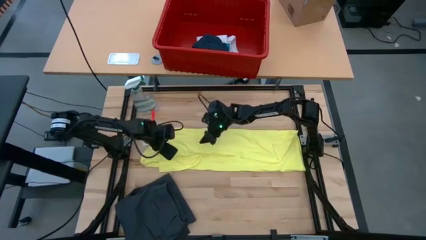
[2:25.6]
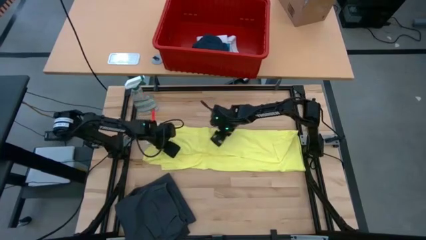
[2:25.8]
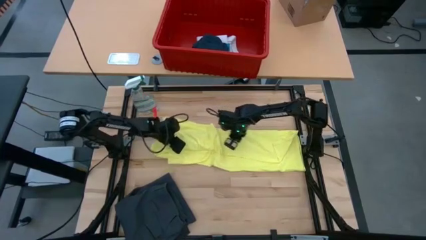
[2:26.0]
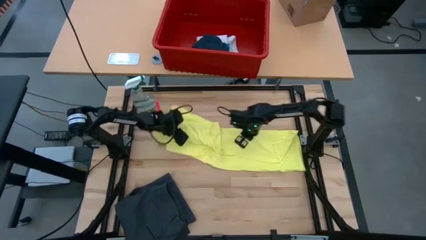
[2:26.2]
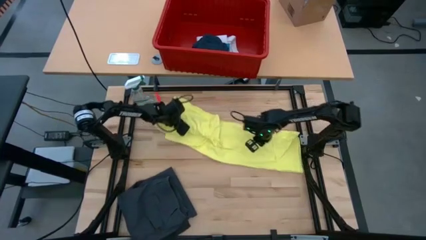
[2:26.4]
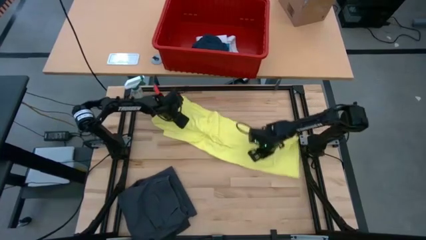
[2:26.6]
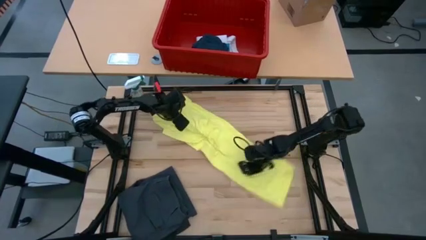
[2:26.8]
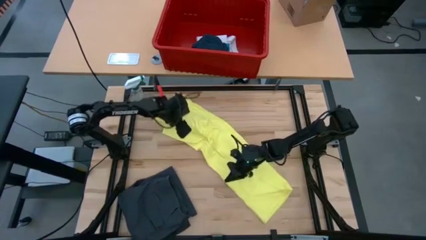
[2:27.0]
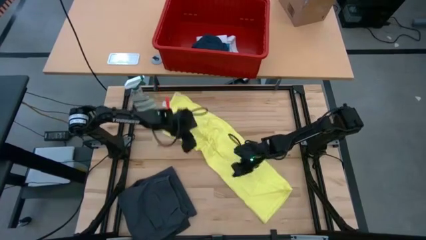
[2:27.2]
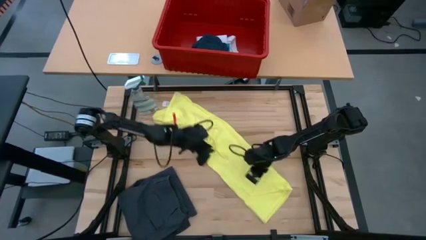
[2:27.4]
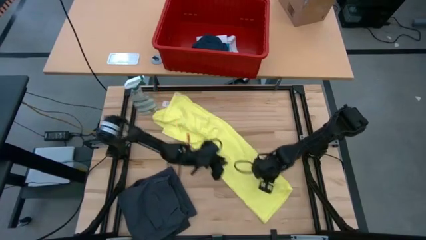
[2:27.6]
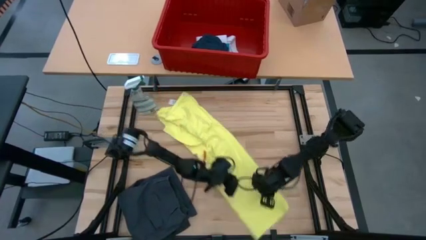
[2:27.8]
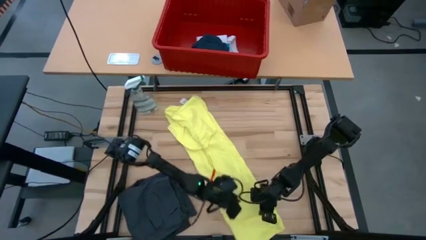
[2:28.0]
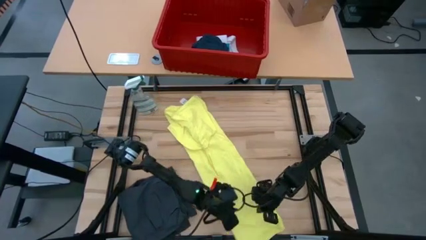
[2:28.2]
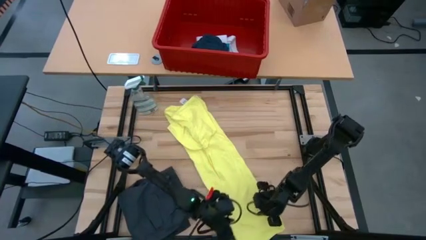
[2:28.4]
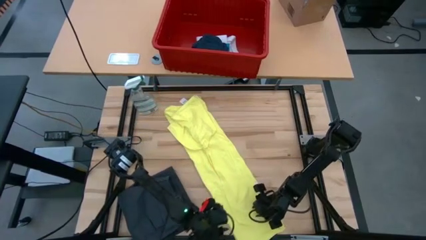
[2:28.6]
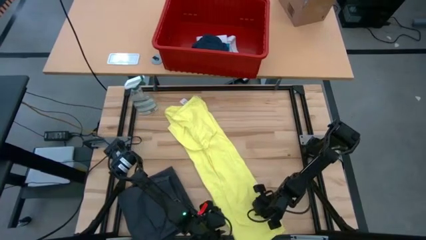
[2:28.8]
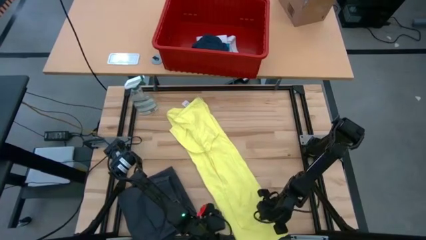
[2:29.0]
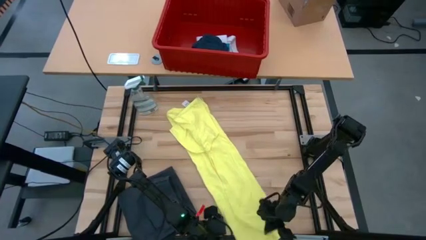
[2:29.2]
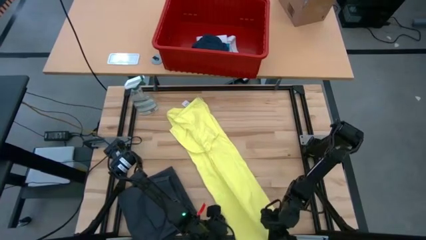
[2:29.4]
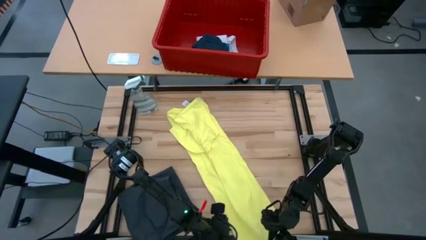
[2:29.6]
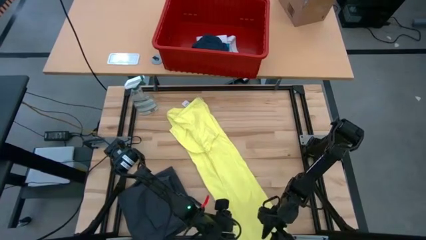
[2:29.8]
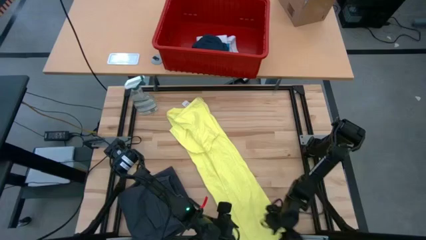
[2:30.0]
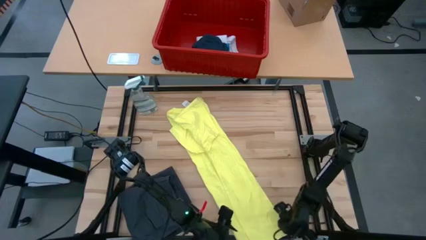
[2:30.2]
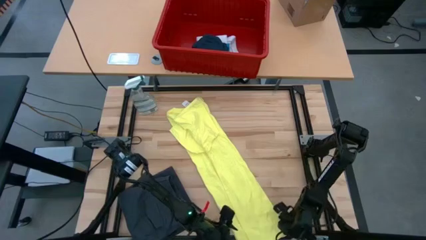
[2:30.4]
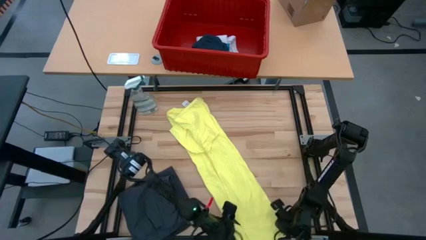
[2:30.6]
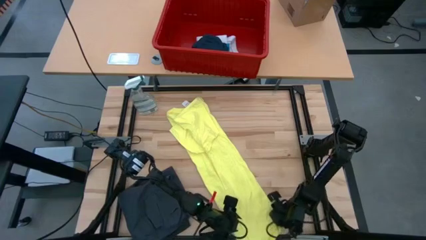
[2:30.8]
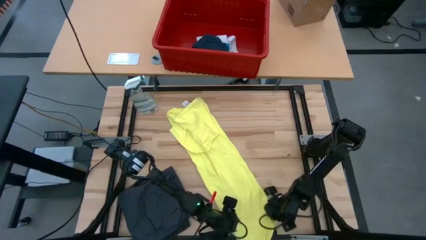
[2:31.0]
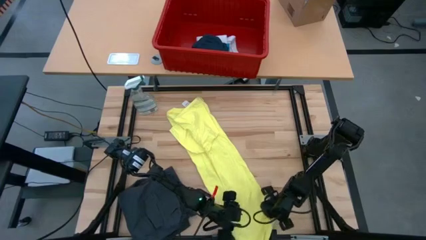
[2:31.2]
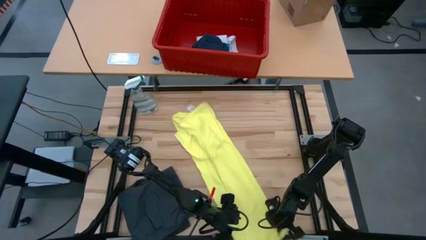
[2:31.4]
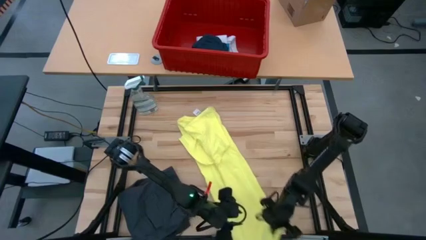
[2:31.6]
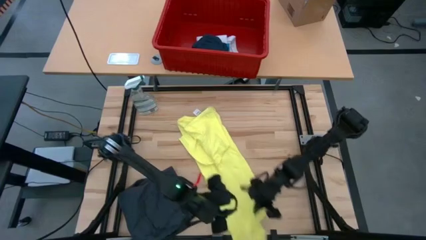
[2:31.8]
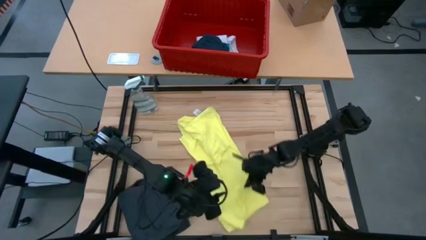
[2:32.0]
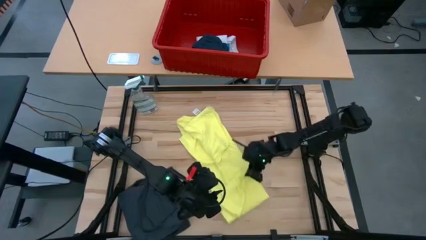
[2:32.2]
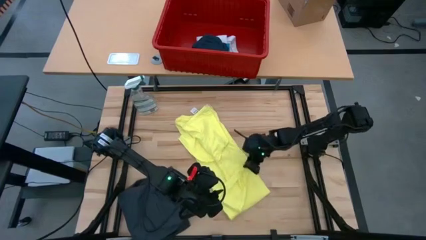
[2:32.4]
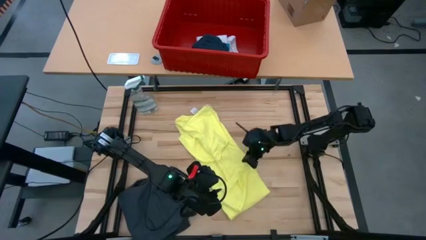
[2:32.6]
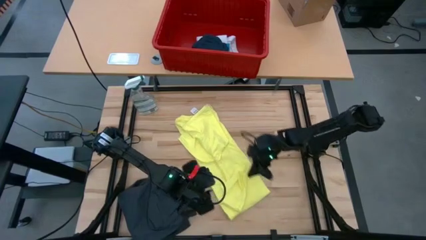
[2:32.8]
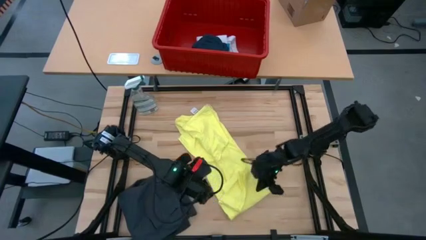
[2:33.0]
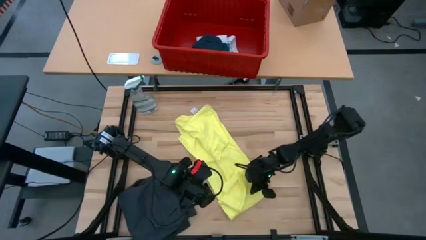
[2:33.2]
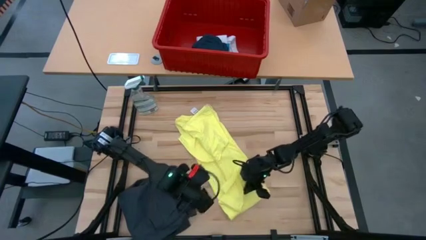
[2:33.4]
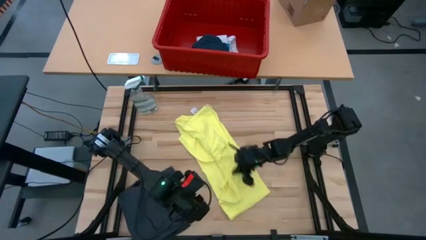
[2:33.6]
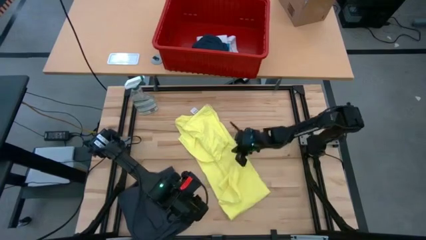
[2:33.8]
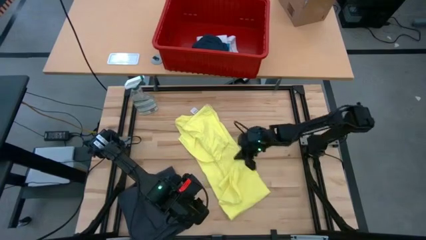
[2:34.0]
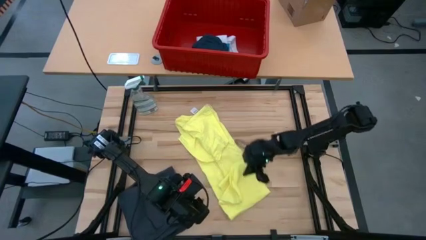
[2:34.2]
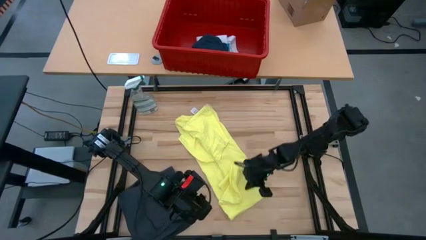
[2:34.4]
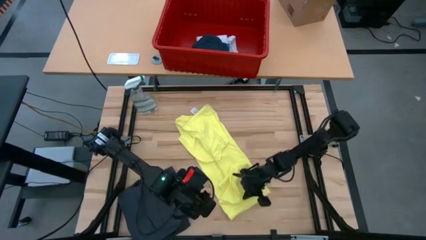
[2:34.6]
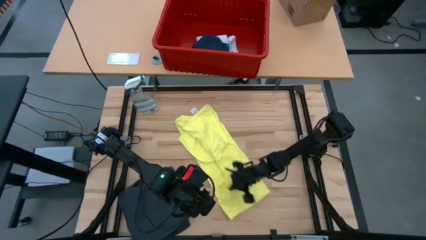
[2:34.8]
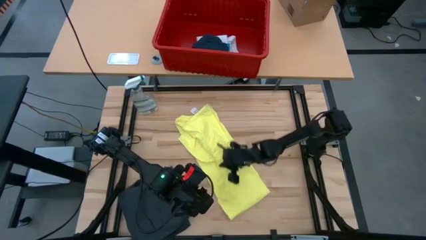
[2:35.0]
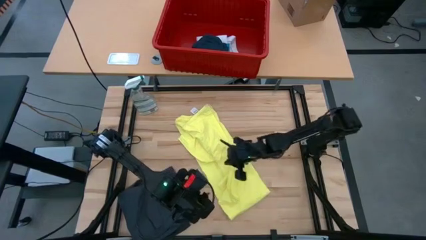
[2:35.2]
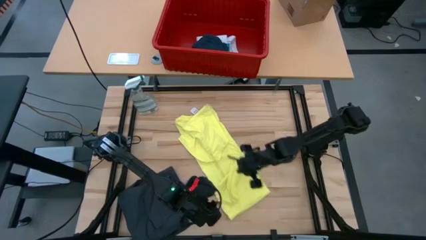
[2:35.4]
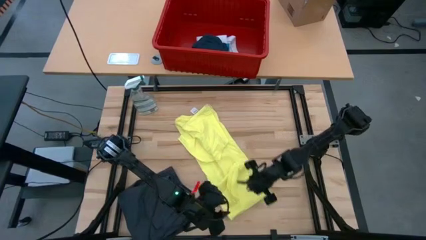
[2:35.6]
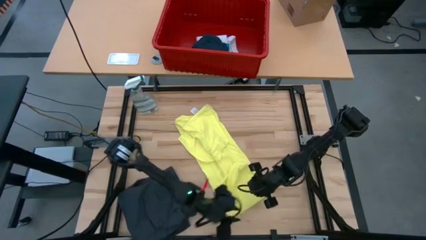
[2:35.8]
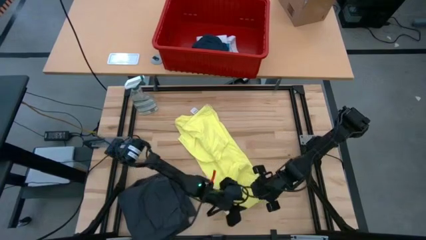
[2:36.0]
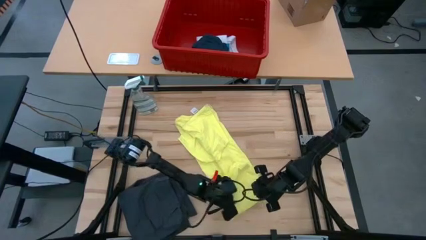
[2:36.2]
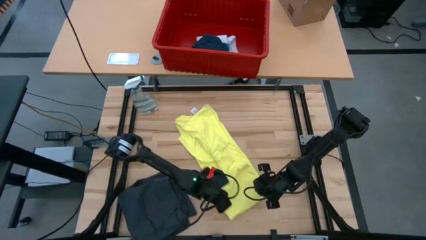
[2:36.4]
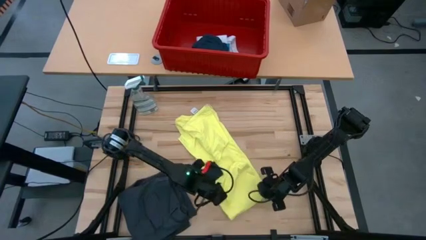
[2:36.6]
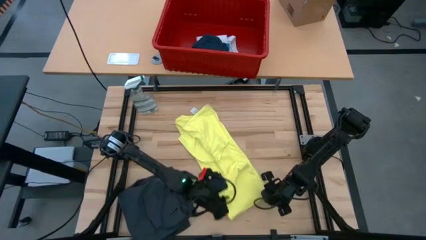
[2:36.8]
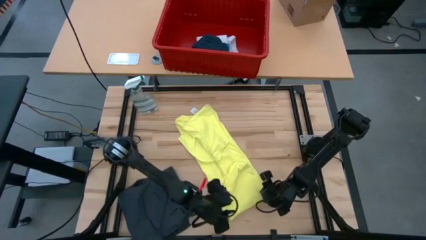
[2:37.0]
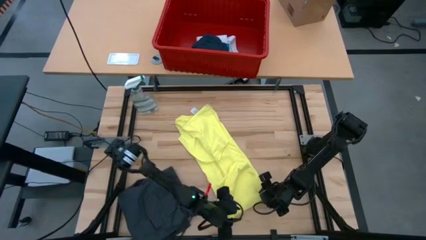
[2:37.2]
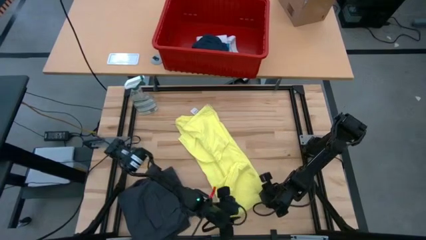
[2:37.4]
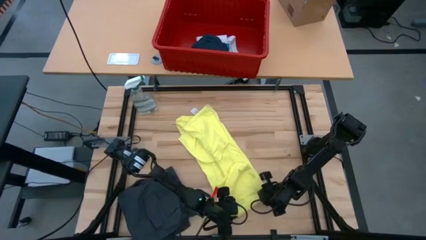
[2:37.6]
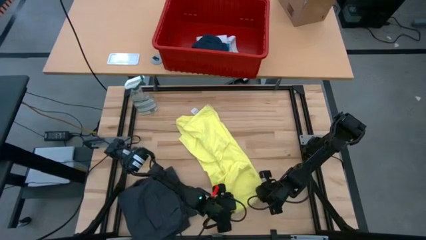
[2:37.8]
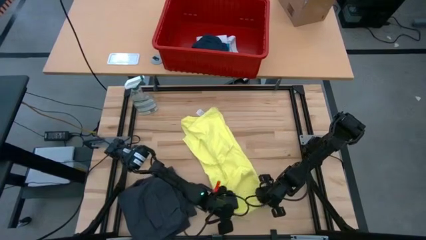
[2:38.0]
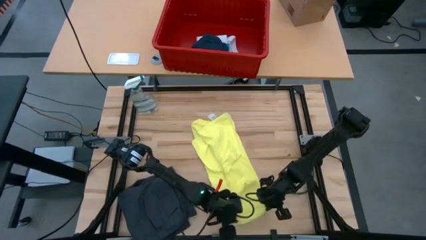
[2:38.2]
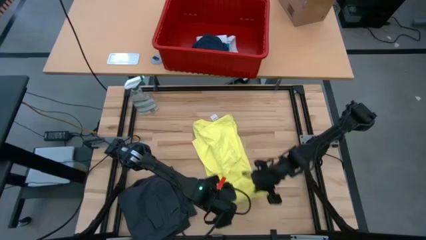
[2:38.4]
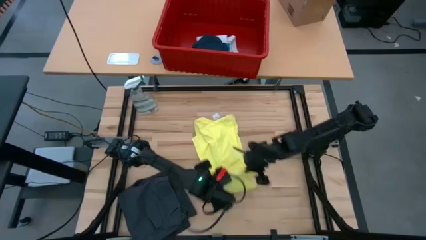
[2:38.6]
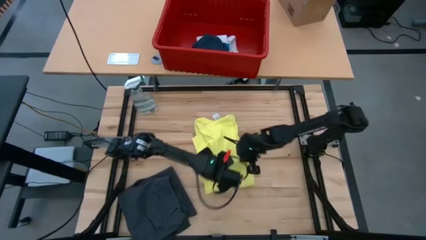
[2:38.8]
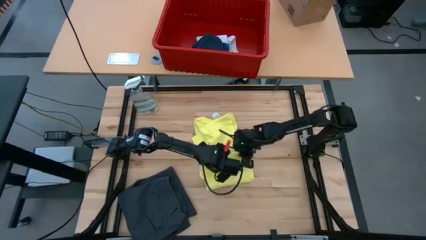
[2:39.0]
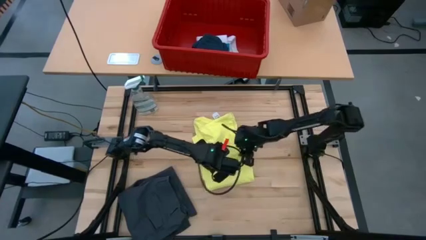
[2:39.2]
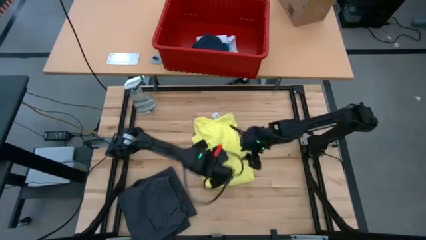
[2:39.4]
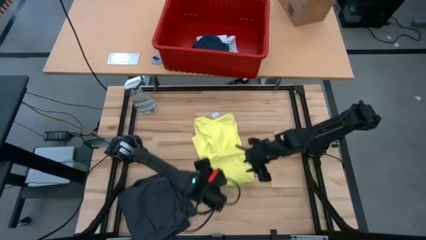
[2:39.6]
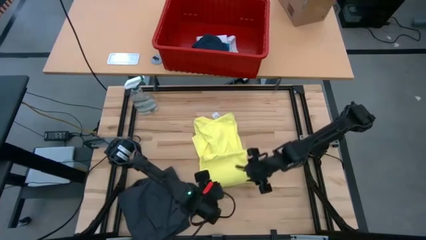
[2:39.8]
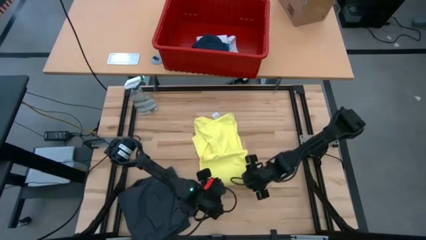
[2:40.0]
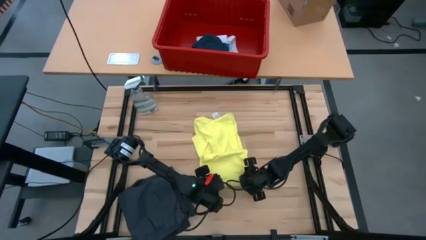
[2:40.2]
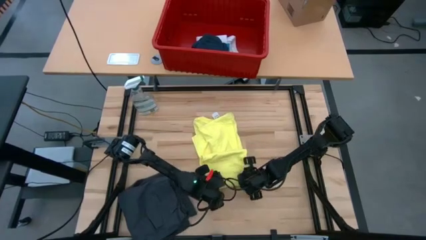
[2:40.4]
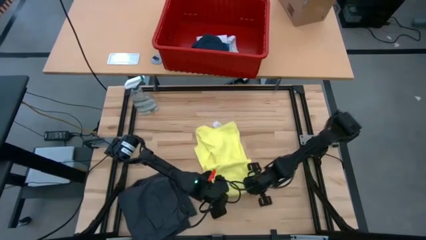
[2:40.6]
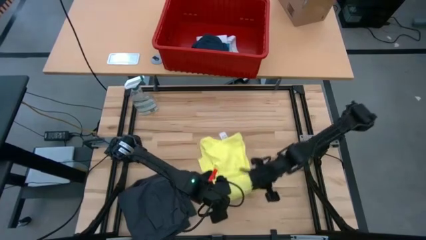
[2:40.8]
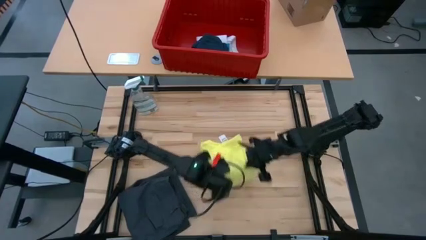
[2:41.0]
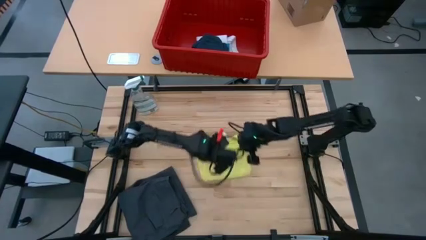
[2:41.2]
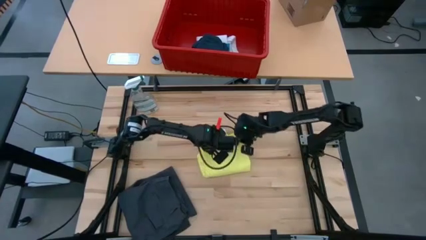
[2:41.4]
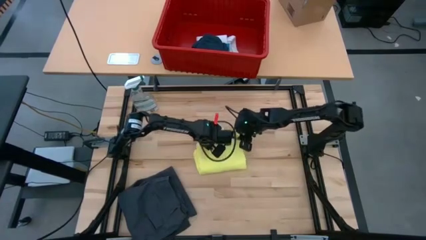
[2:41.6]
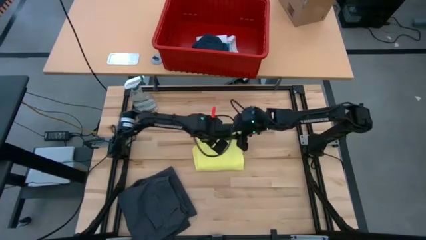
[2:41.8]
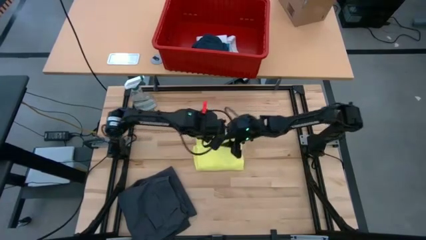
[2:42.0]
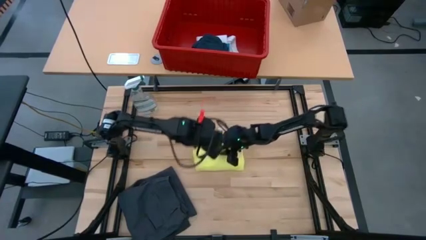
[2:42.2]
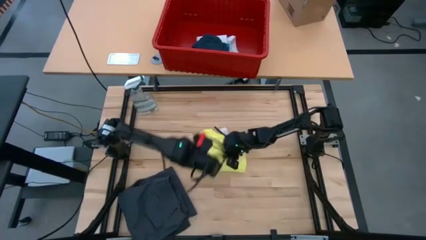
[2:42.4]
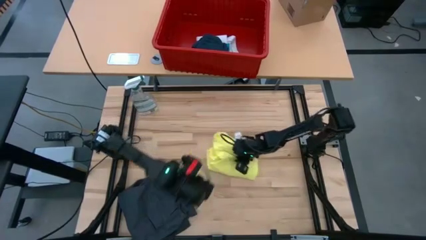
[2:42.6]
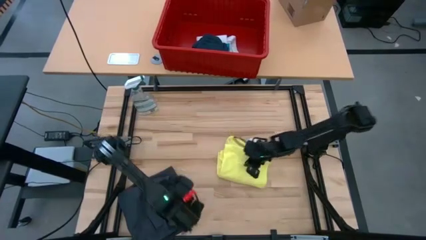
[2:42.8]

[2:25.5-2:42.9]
Task: Fold Laundry from Bin
Fold the yellow shirt

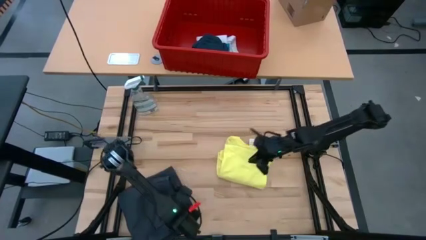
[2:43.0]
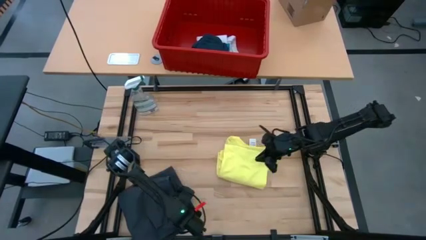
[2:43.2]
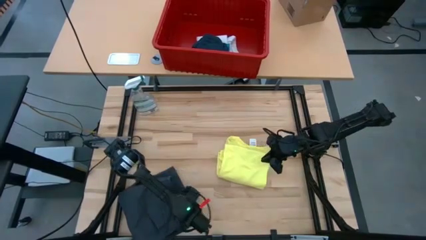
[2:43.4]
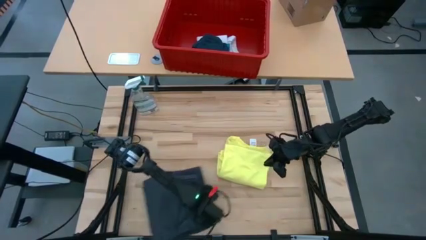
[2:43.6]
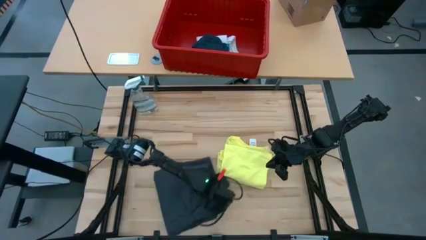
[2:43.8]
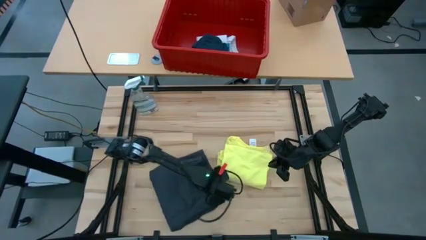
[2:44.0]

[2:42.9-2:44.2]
Adjust the black short
